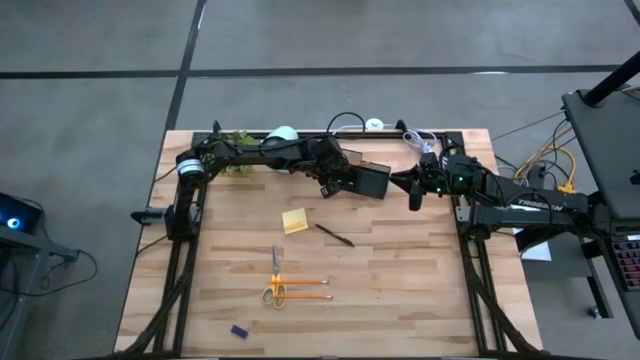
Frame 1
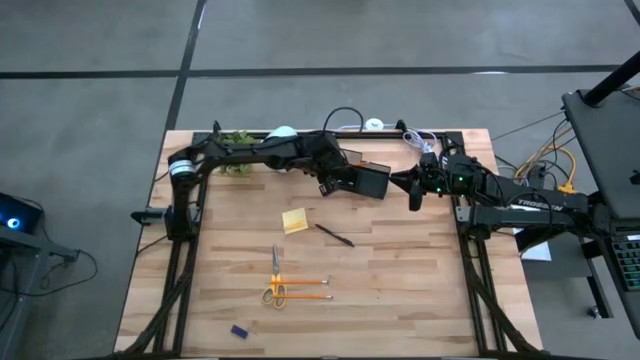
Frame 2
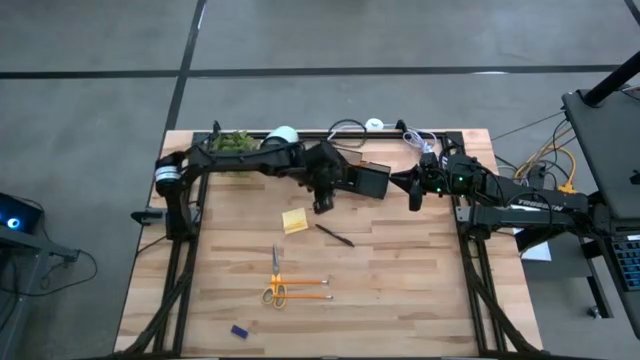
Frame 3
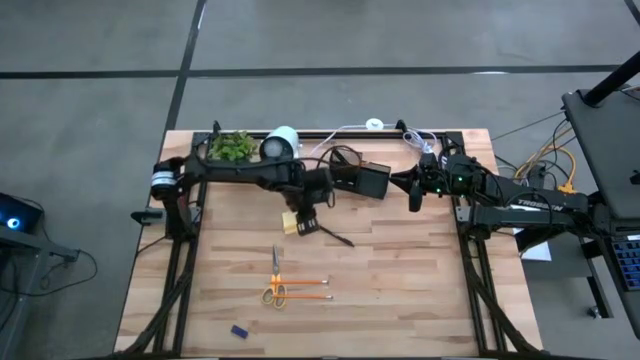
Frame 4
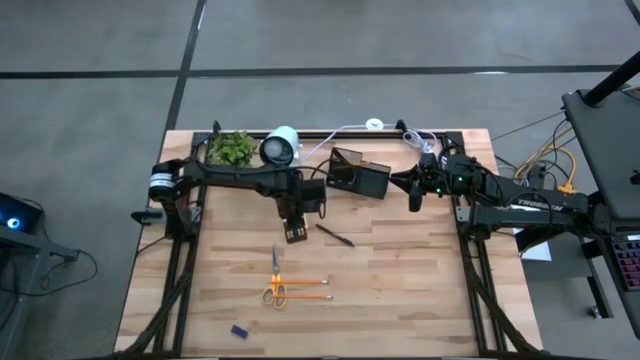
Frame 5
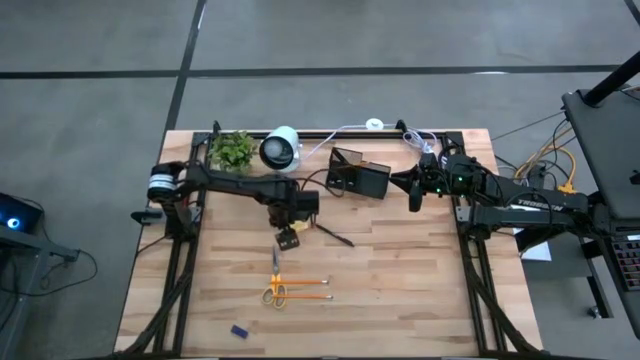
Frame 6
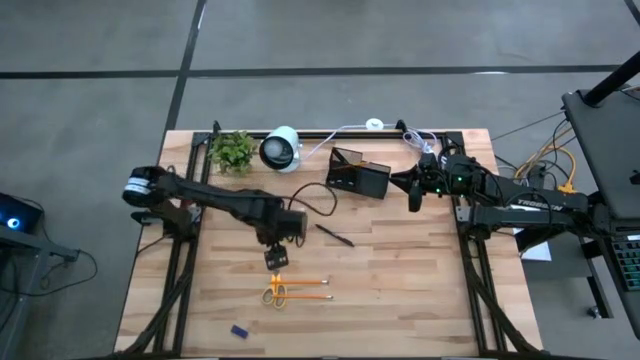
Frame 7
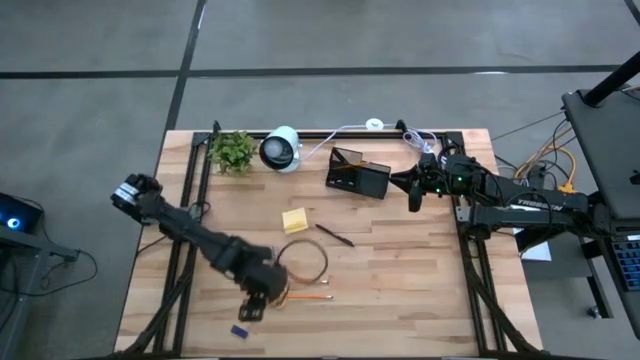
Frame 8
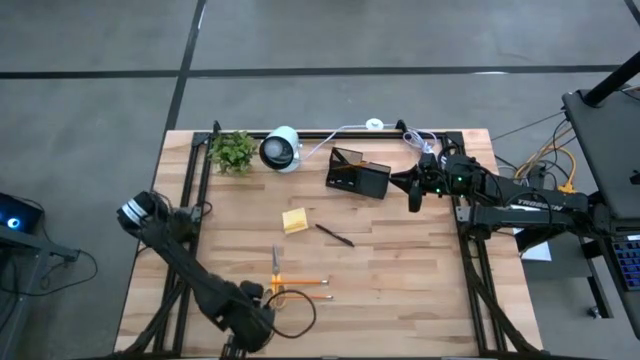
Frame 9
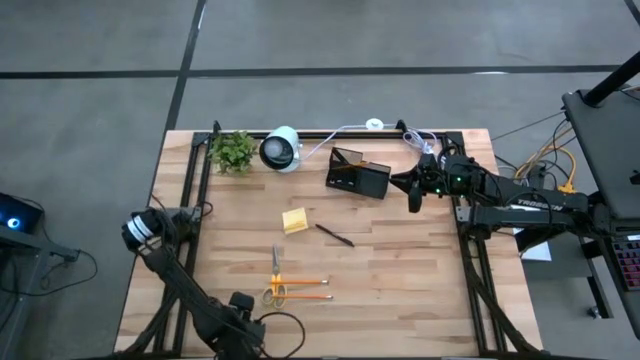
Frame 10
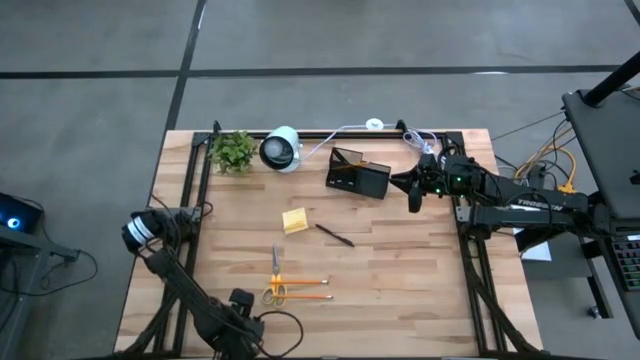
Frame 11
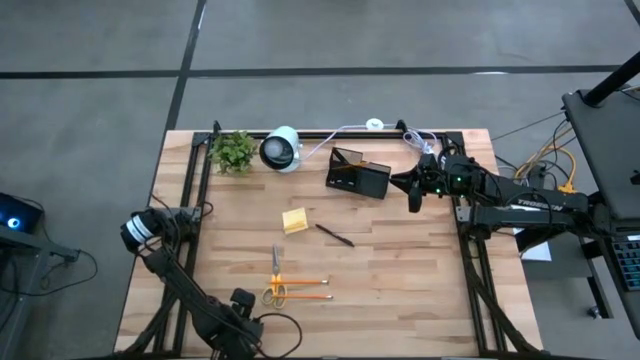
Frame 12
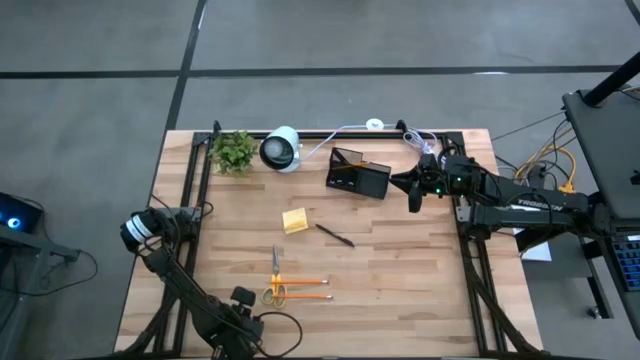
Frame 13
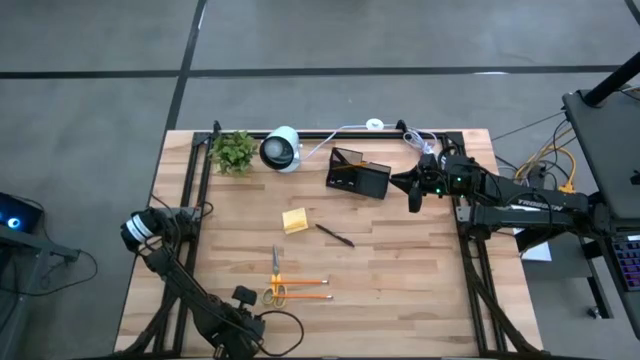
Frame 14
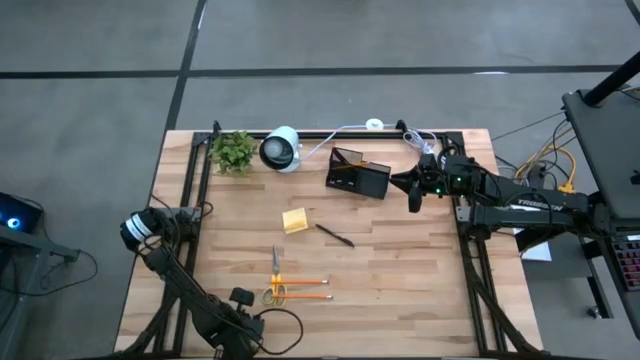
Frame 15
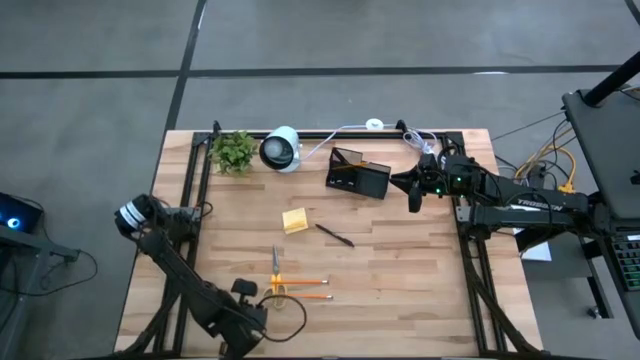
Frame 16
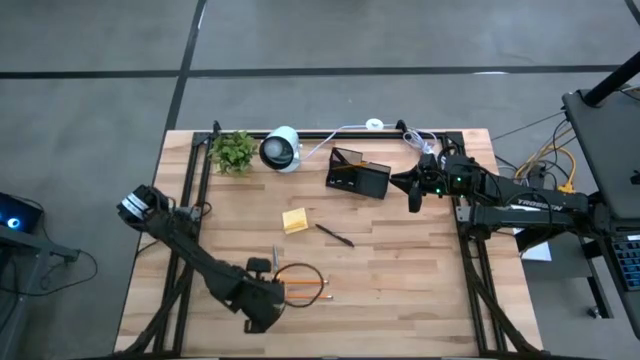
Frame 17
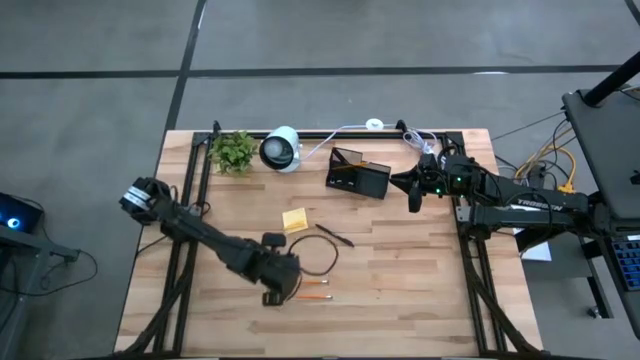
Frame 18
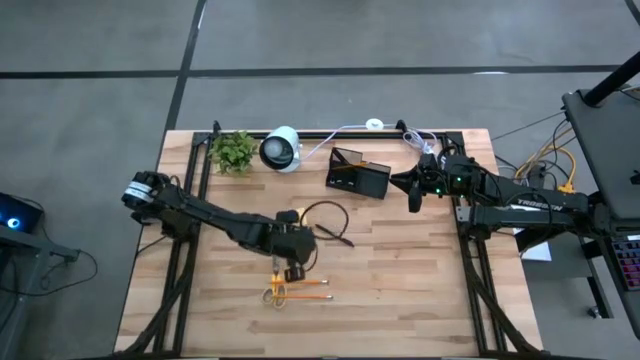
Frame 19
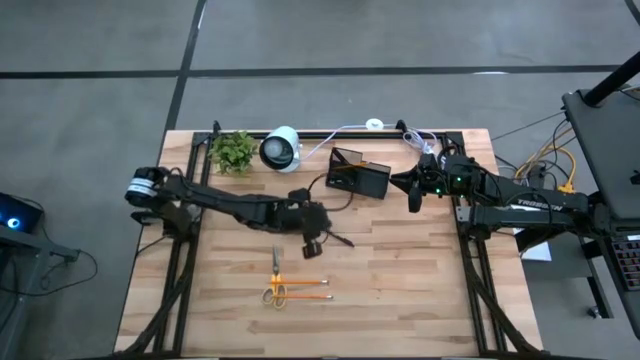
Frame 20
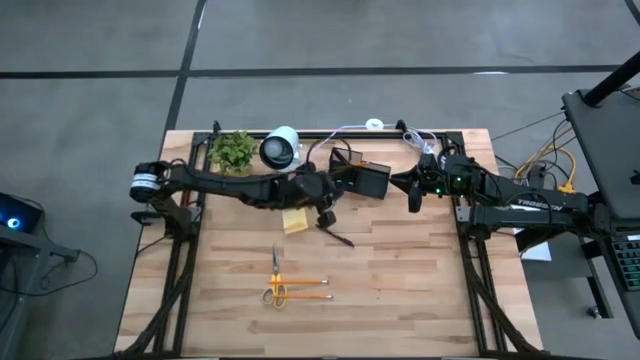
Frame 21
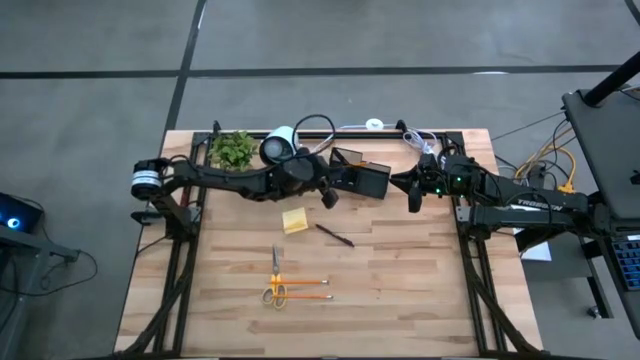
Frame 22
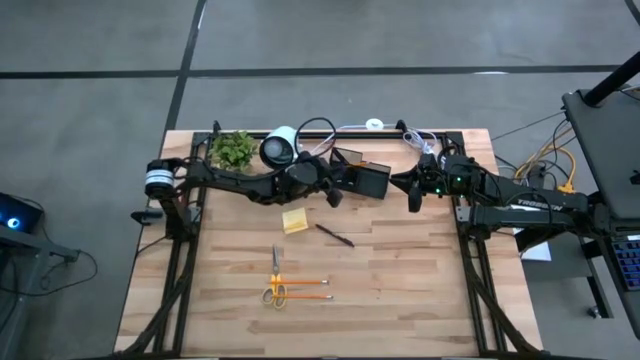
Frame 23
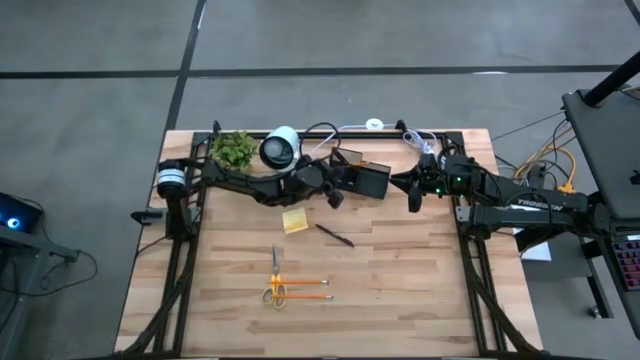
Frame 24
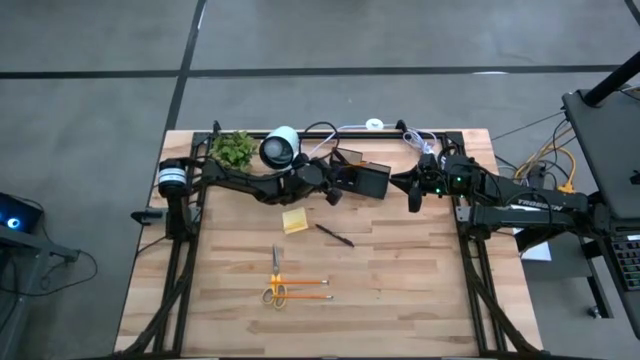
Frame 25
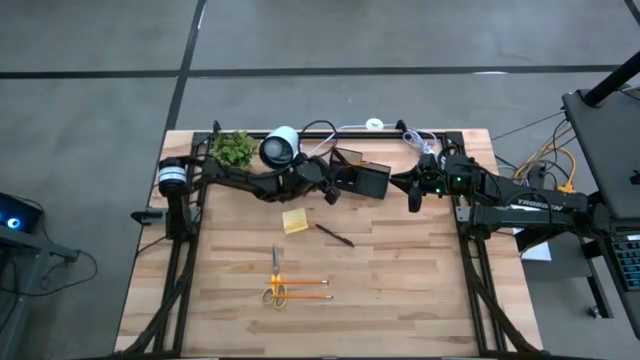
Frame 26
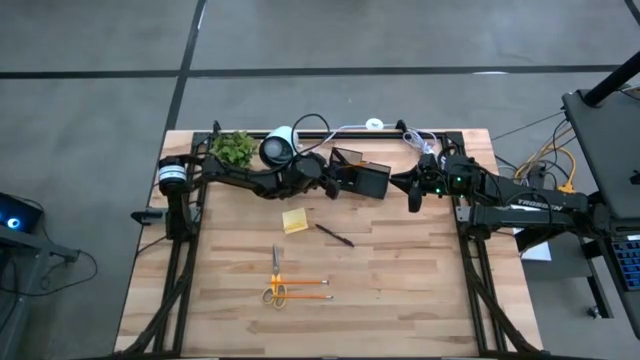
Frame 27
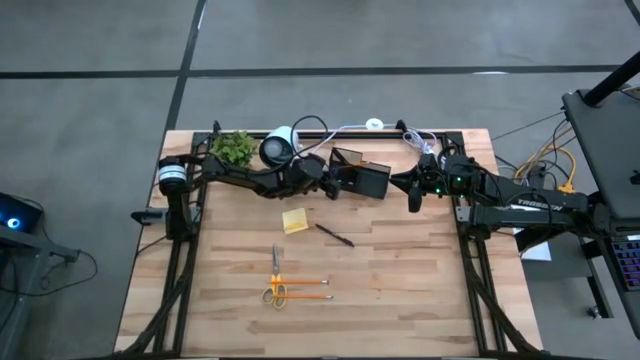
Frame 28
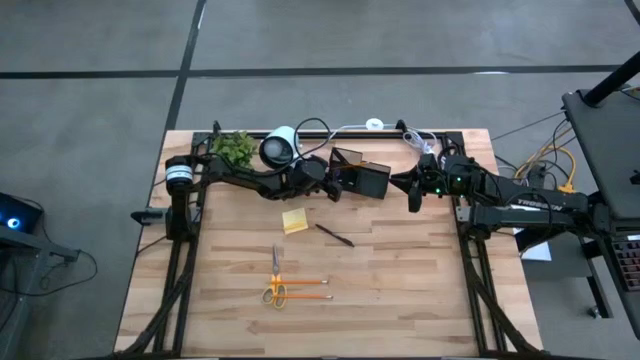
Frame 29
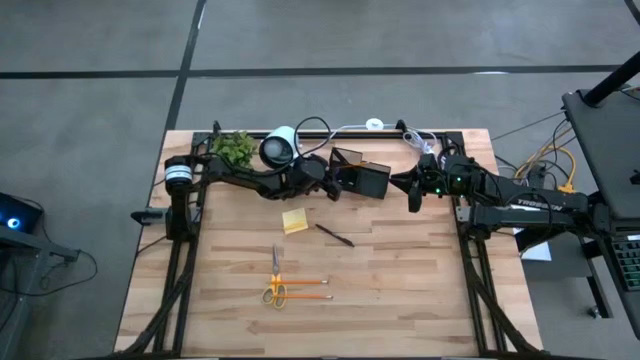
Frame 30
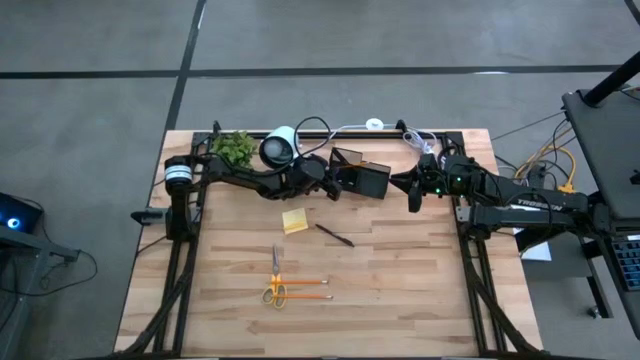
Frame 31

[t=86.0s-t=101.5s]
Task: Pick and place office supplies into organizer
Put the eraser into the desk organizer

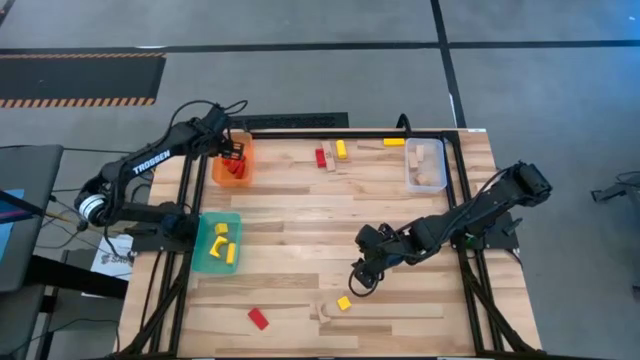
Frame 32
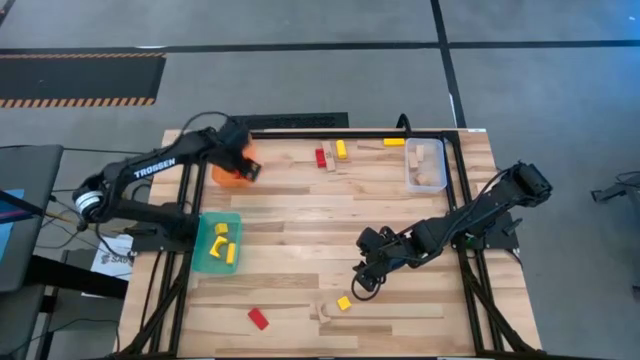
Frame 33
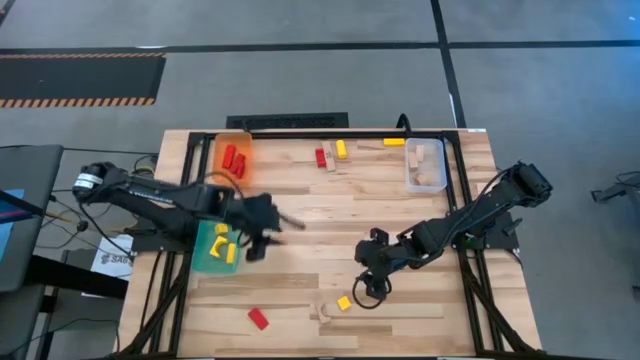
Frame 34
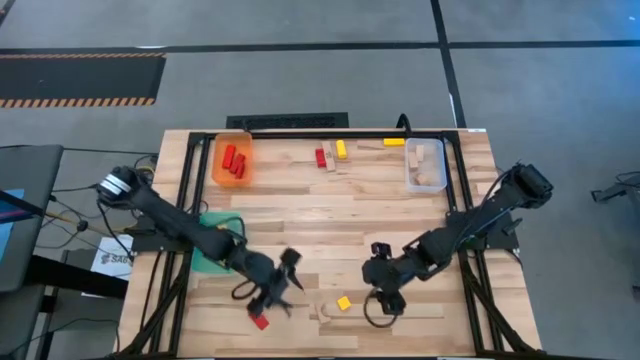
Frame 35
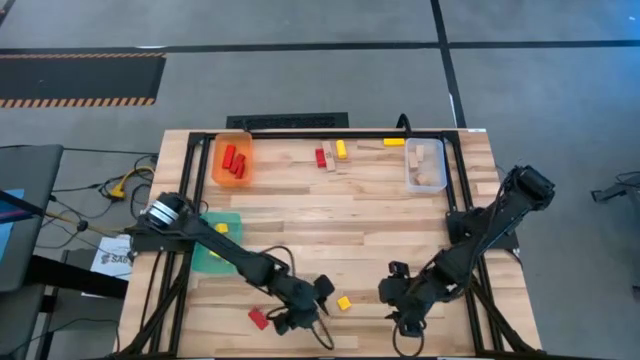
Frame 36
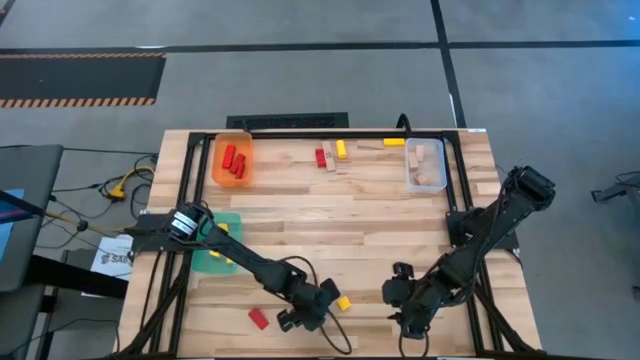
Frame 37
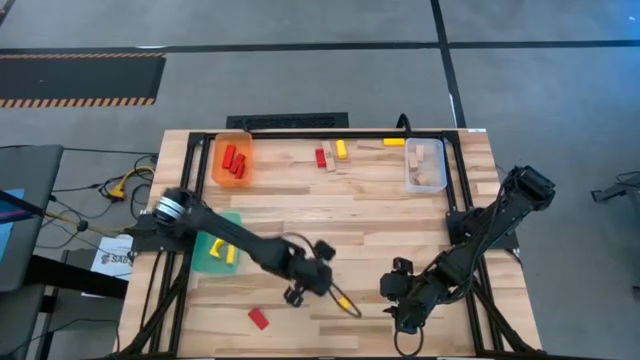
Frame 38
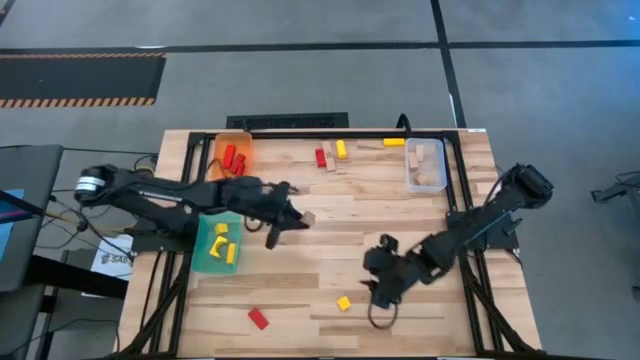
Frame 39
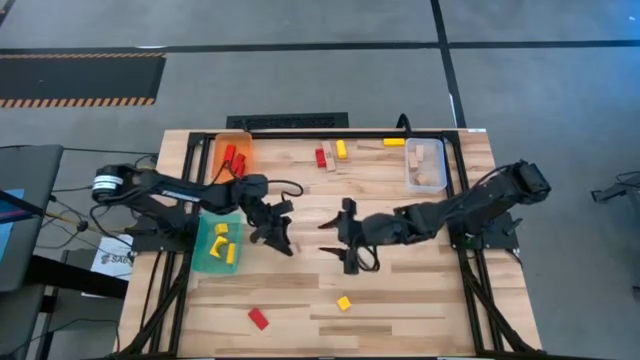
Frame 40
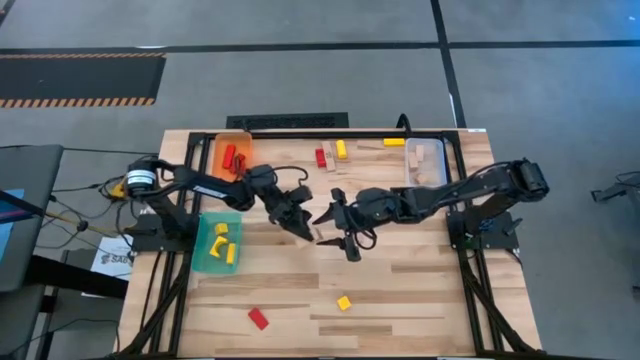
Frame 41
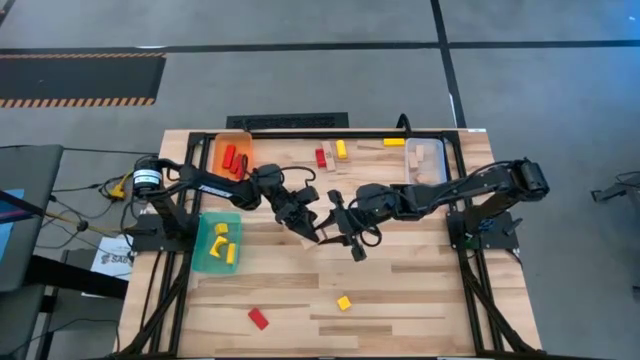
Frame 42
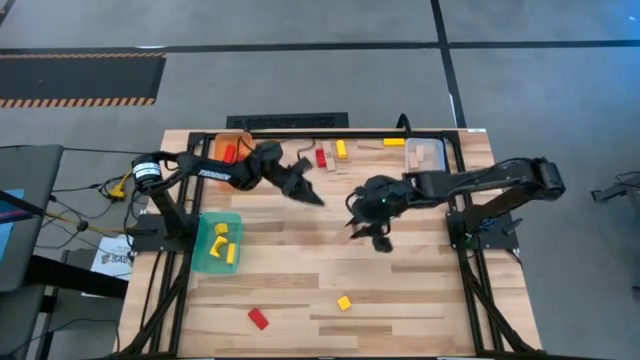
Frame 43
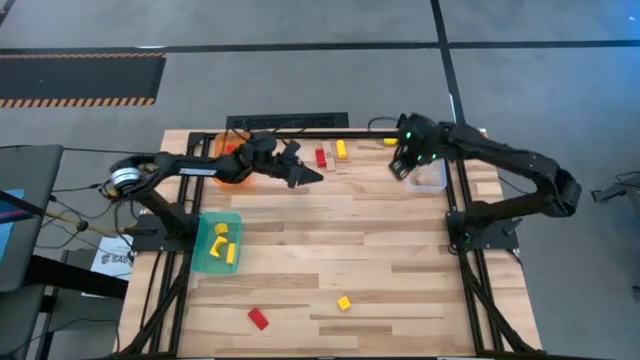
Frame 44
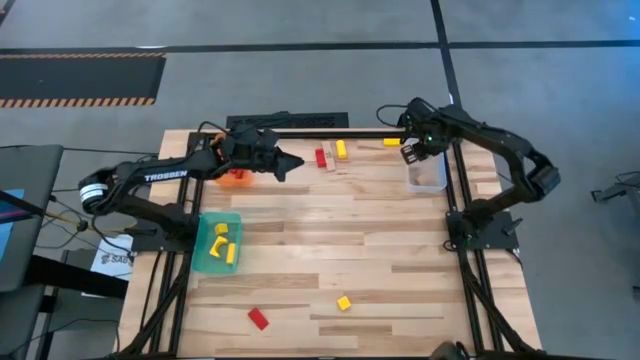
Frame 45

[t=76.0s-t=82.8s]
Task: Sort & place blocks by color
Put the brown wooden block into the white bin
